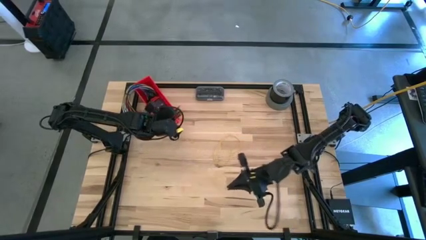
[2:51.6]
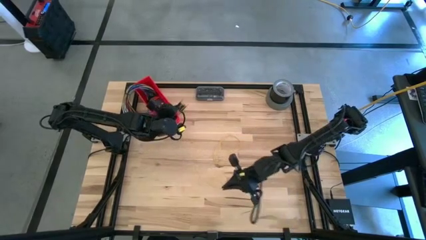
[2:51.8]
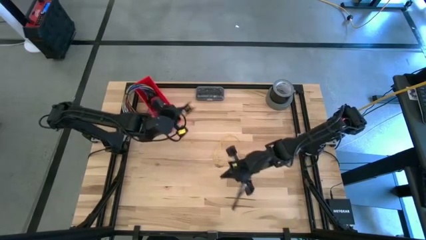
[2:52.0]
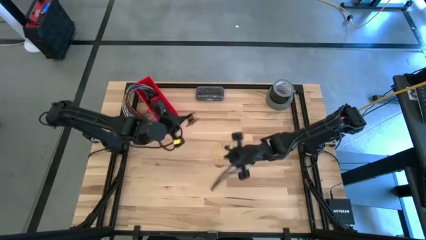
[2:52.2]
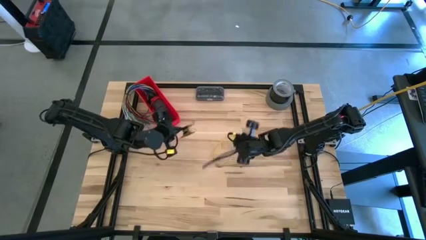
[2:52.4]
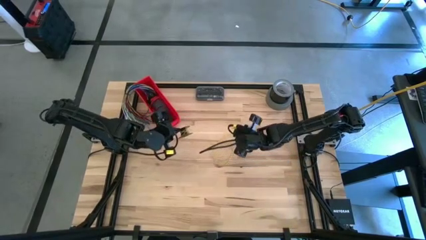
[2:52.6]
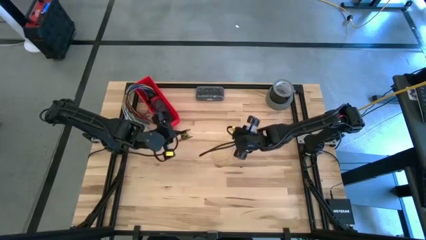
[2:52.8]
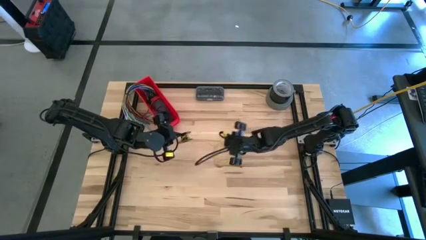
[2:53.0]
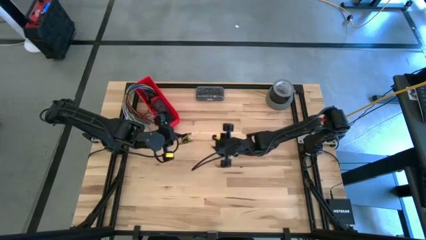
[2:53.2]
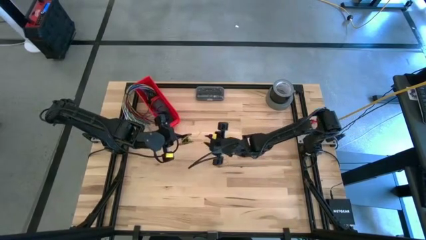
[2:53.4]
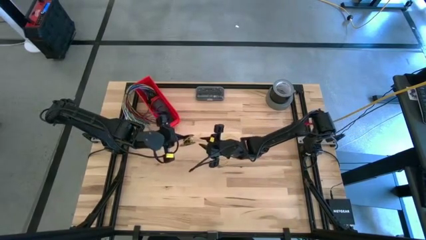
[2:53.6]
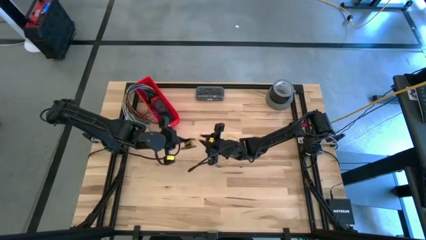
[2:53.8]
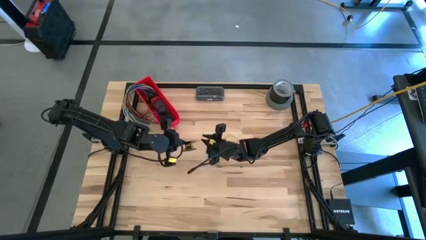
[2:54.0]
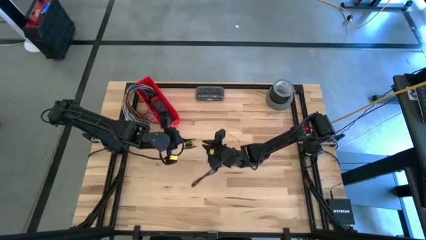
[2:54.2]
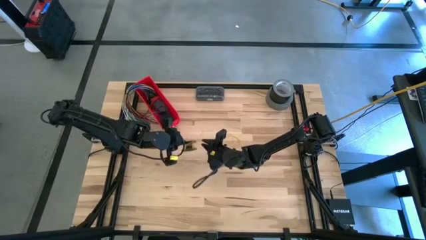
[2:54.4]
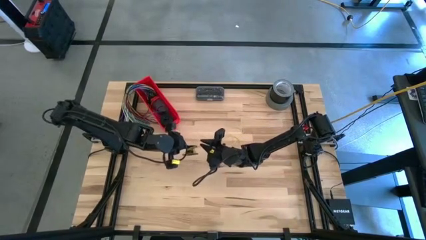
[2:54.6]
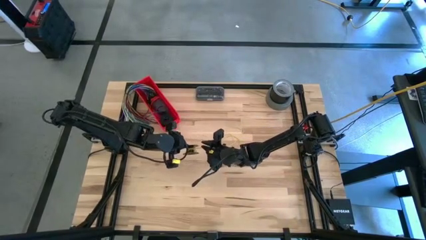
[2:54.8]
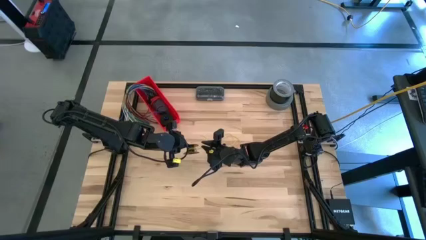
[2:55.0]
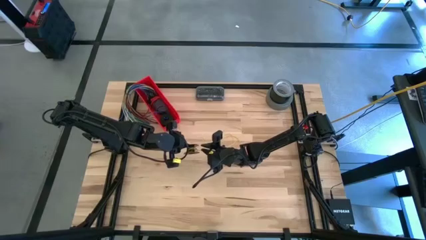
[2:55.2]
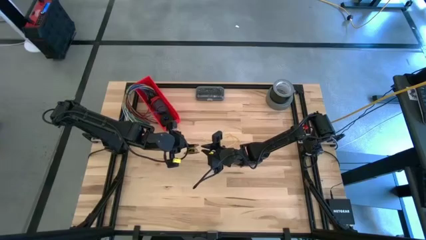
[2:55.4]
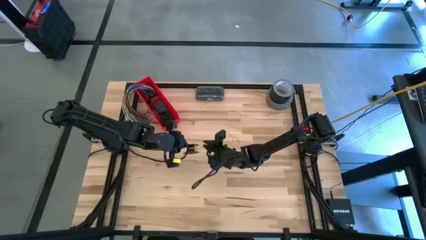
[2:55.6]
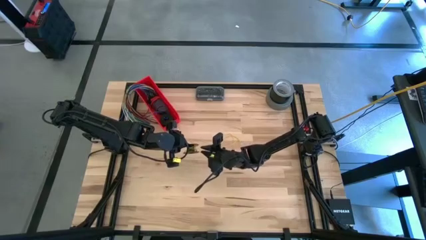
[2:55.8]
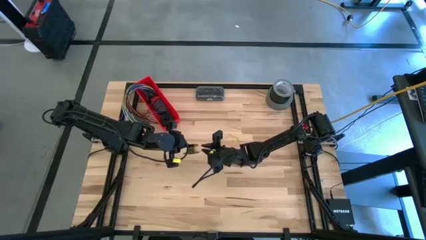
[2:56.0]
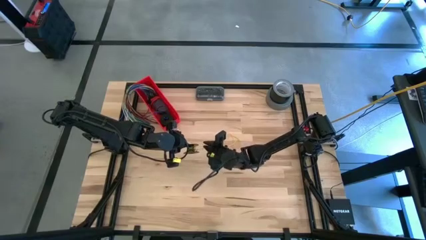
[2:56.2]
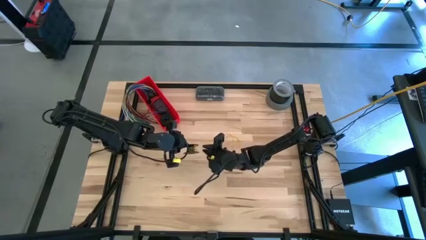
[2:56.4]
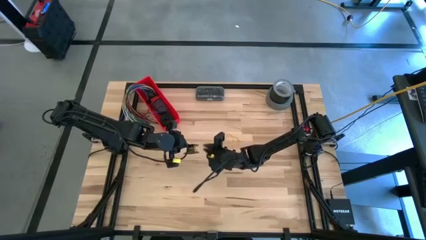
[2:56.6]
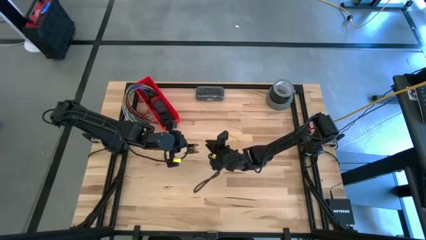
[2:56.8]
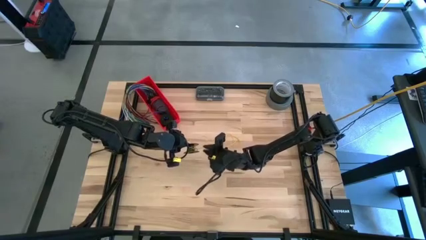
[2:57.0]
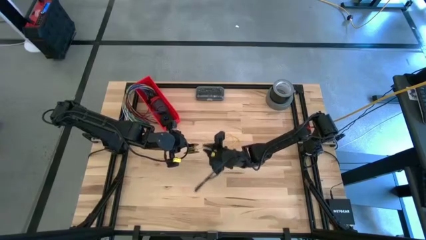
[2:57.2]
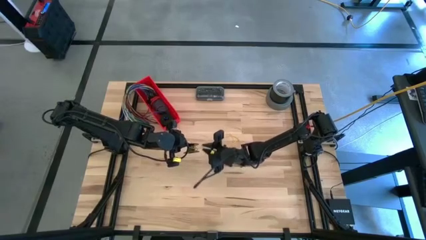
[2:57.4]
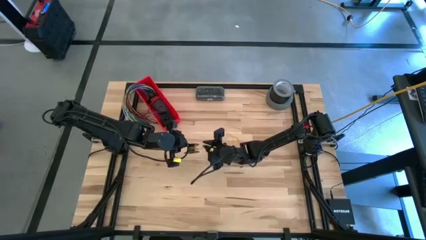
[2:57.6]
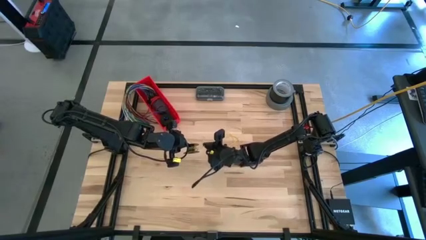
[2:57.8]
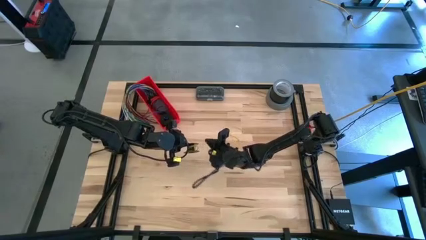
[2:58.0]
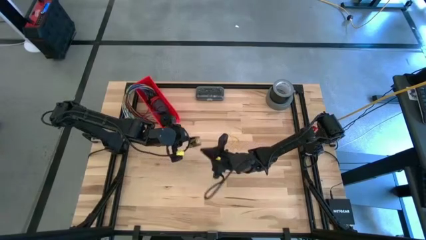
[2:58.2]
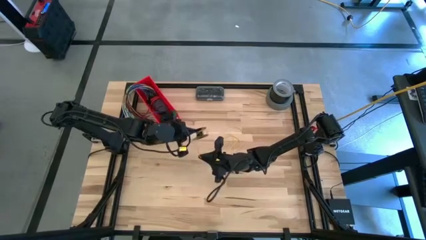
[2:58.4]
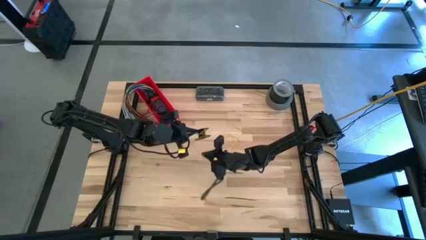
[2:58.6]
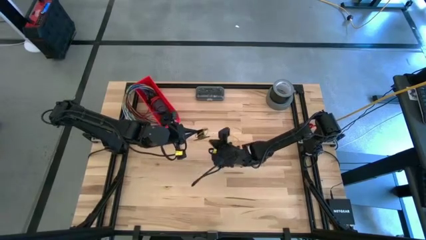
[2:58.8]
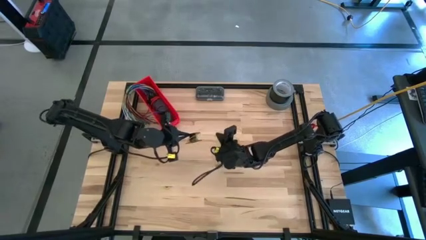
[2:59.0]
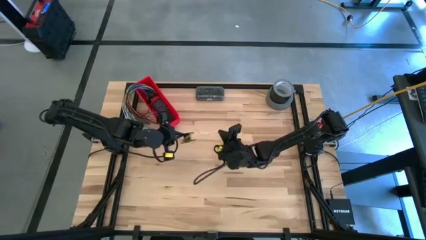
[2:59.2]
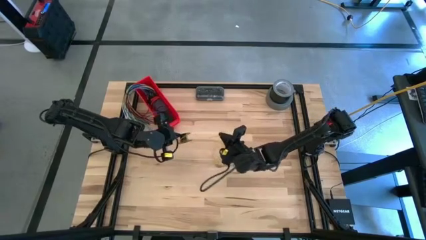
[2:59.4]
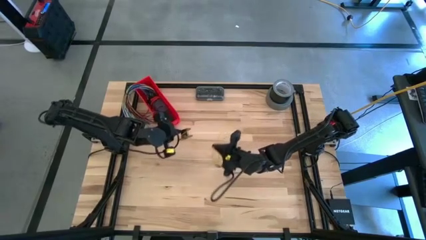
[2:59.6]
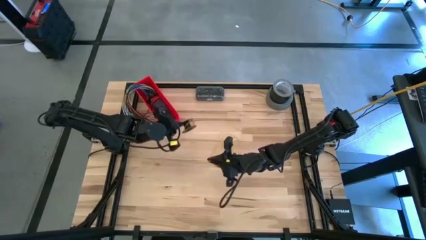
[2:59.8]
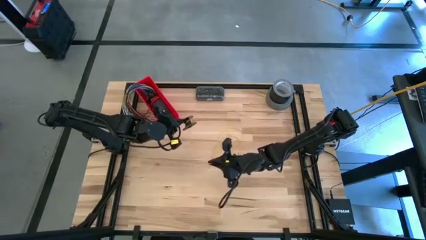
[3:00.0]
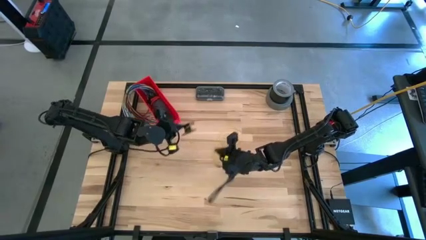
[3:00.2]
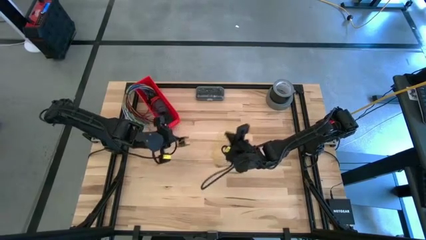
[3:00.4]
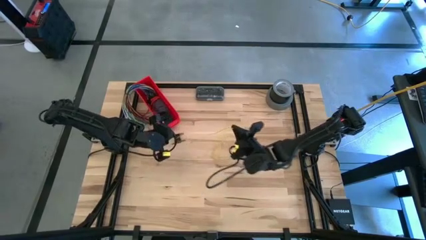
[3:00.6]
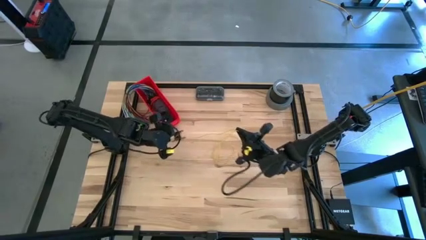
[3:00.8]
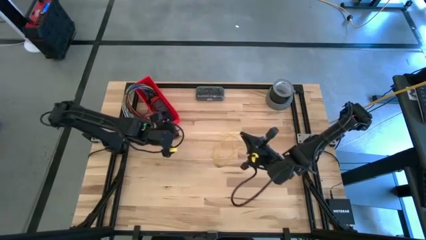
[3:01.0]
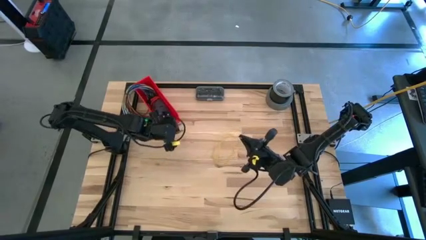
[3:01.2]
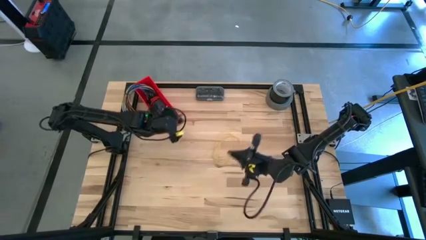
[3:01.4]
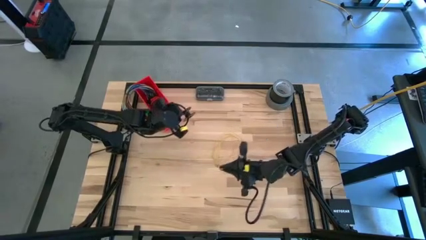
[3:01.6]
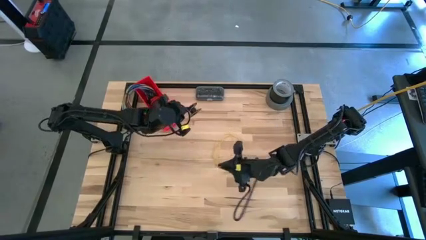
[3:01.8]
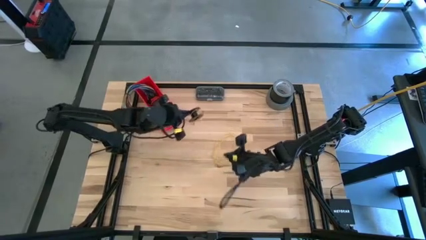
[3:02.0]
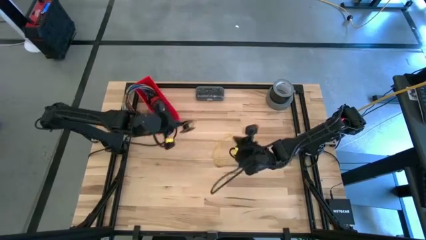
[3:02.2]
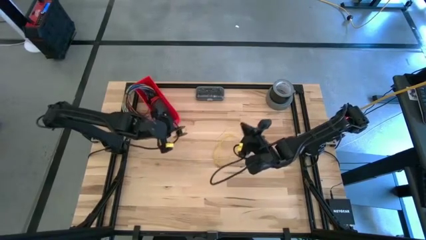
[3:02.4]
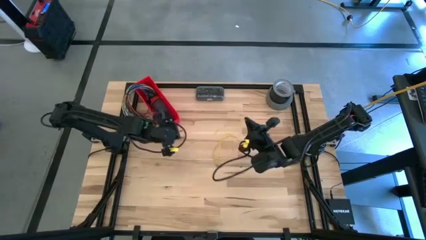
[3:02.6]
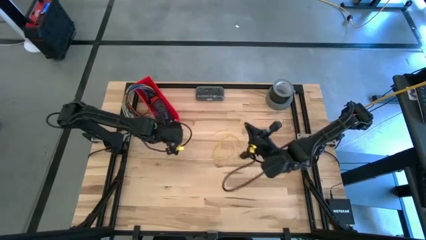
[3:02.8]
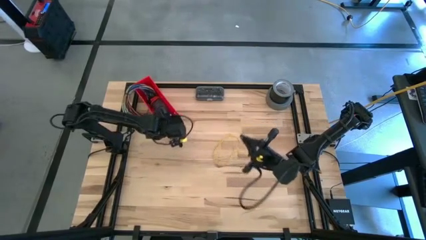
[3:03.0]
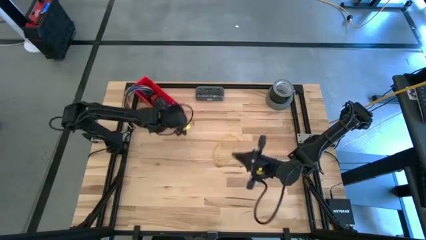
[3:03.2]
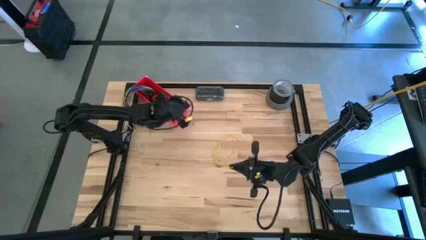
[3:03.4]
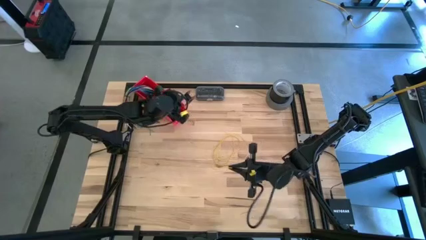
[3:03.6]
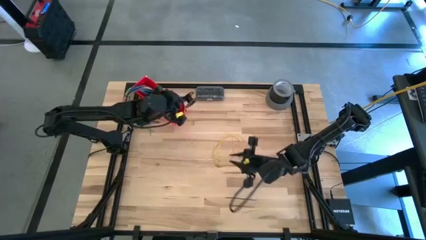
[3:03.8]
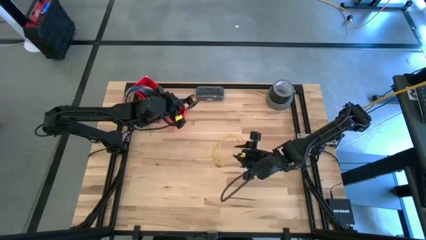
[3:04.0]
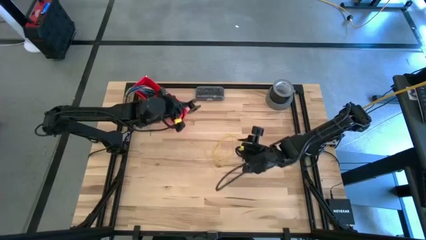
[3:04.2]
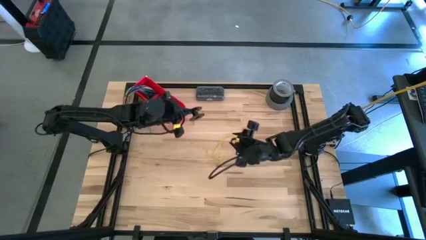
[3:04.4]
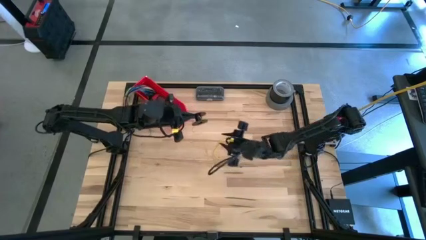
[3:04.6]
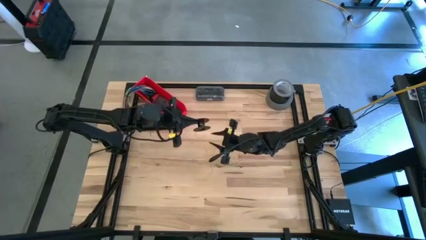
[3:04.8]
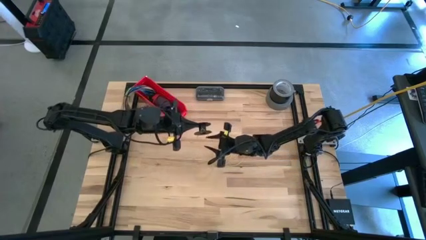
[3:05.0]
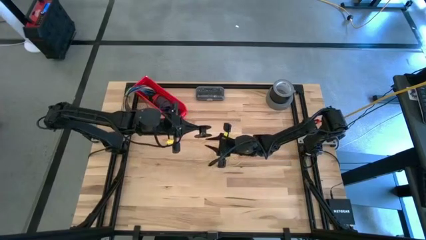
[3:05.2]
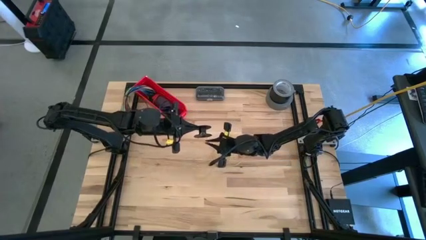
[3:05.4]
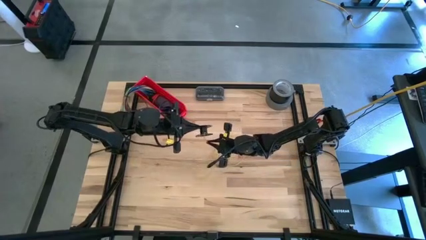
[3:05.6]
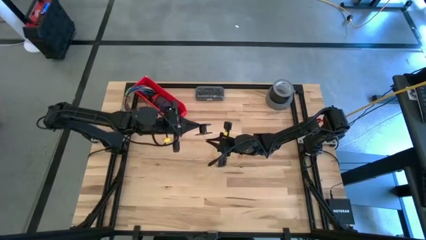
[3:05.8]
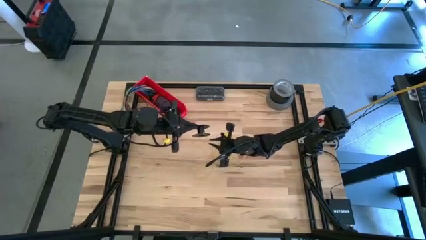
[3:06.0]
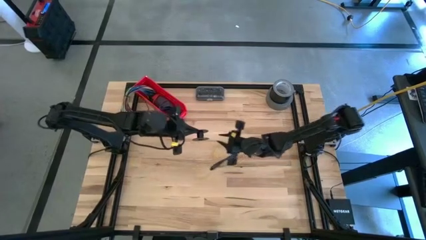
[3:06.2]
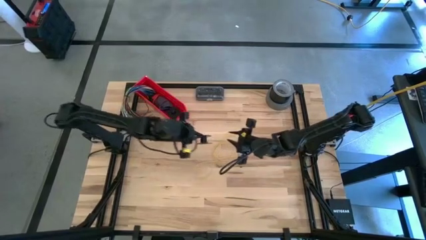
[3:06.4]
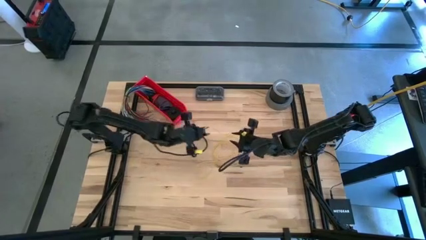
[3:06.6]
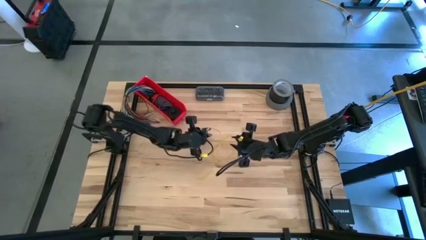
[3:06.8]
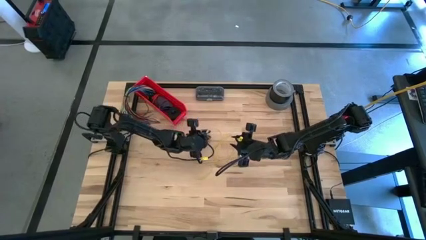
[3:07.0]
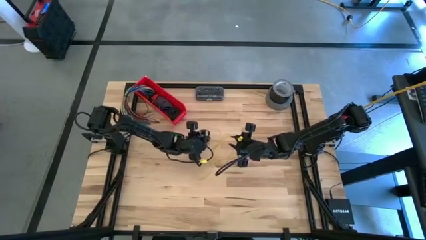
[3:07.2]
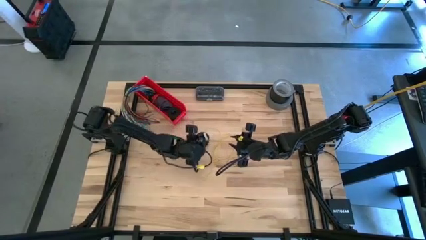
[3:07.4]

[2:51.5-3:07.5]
Task: Coil cords
Uncoil the yellow wire from the spool
